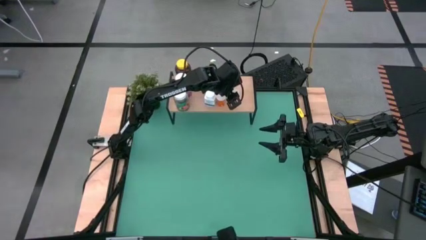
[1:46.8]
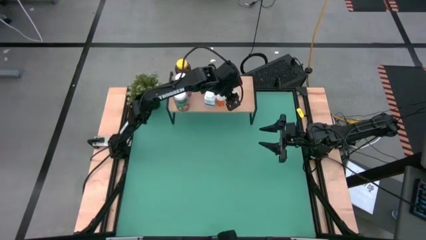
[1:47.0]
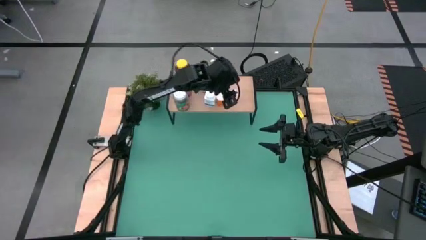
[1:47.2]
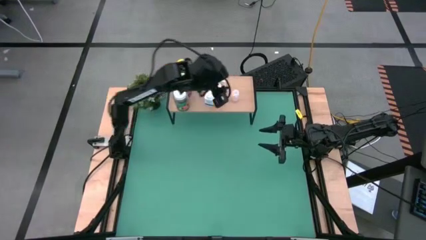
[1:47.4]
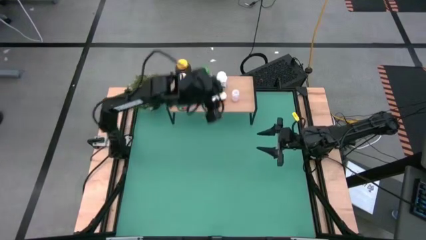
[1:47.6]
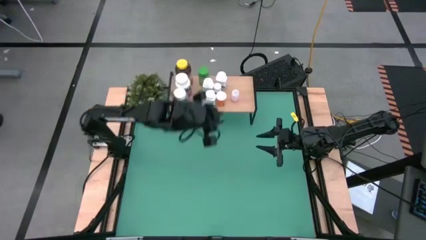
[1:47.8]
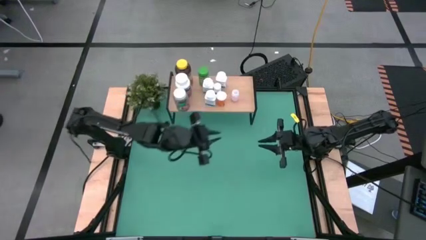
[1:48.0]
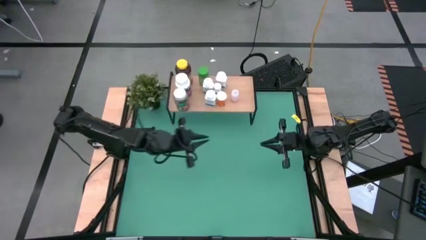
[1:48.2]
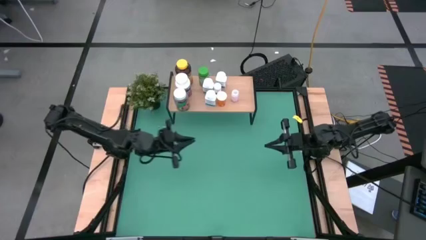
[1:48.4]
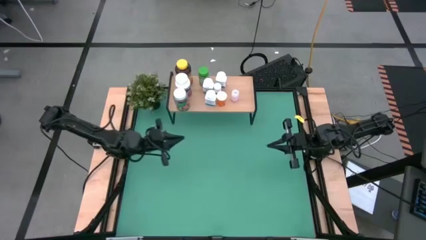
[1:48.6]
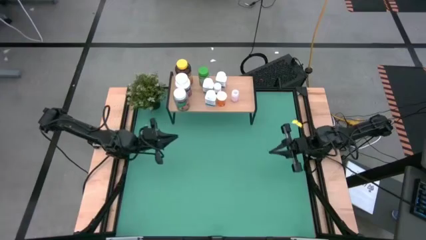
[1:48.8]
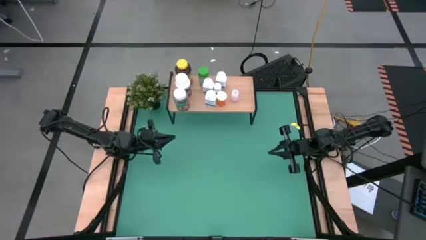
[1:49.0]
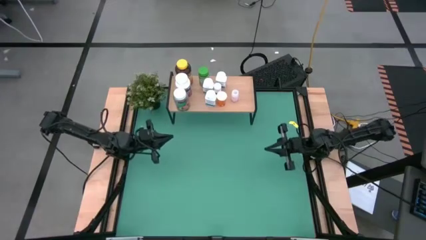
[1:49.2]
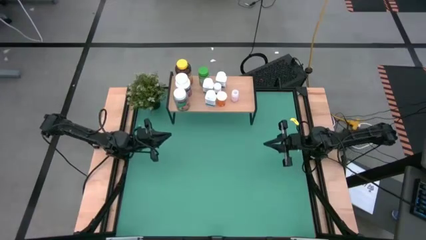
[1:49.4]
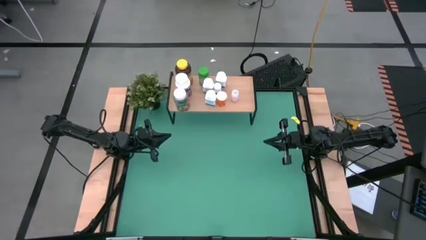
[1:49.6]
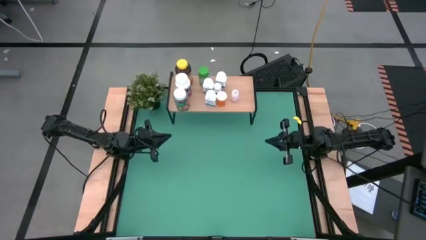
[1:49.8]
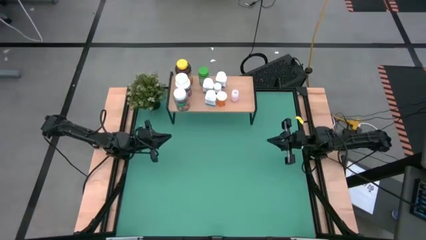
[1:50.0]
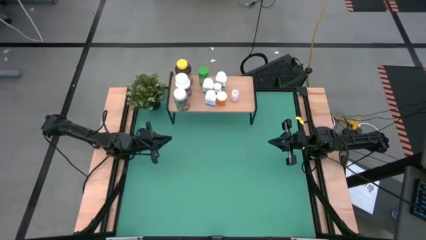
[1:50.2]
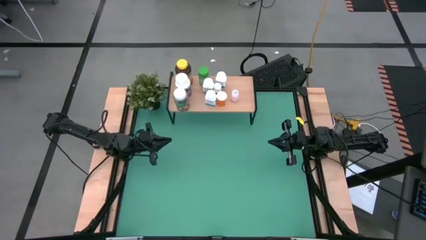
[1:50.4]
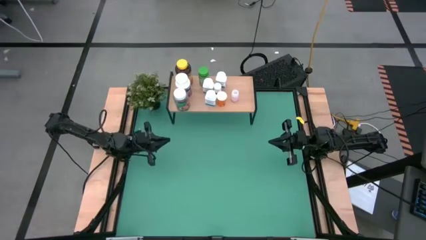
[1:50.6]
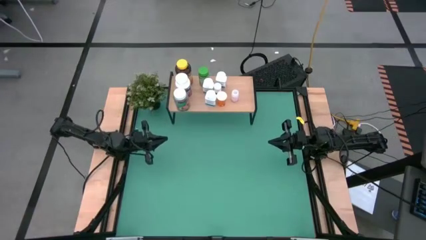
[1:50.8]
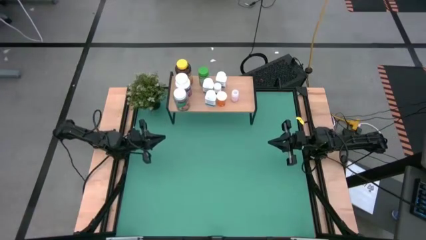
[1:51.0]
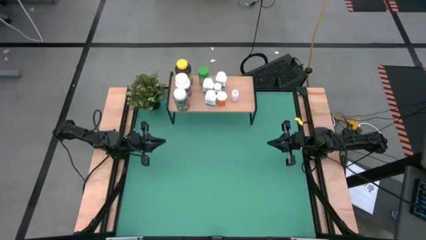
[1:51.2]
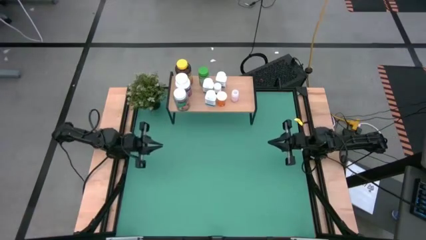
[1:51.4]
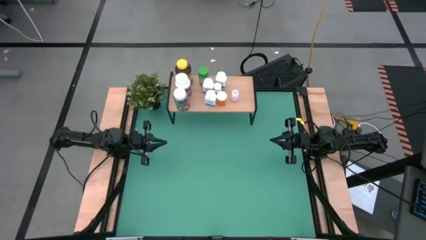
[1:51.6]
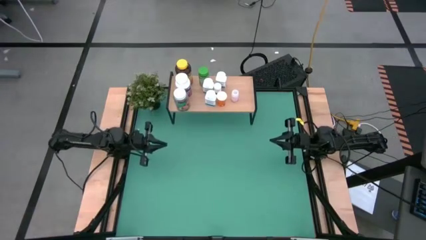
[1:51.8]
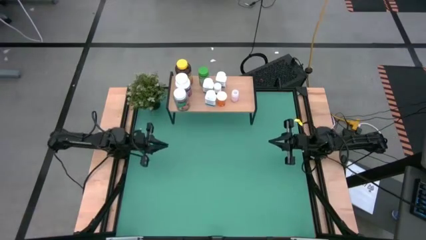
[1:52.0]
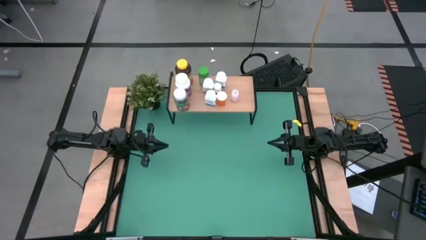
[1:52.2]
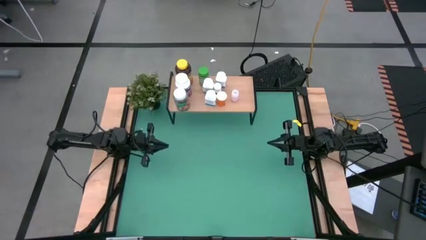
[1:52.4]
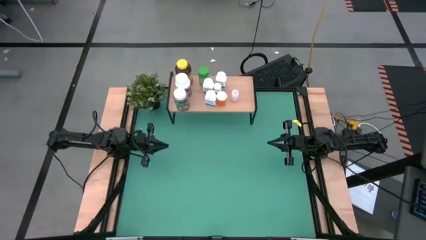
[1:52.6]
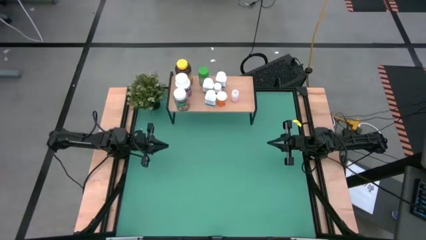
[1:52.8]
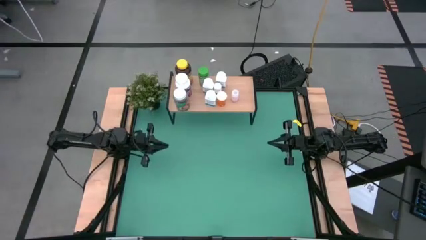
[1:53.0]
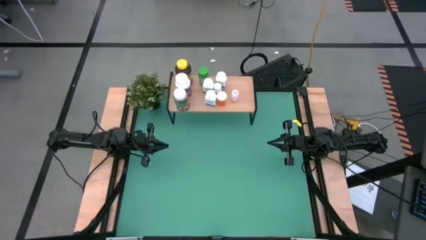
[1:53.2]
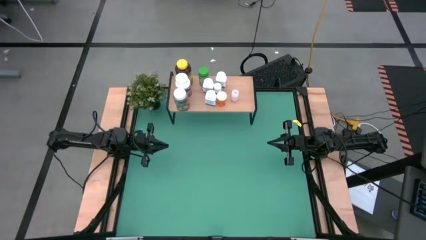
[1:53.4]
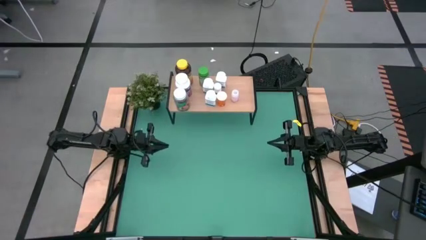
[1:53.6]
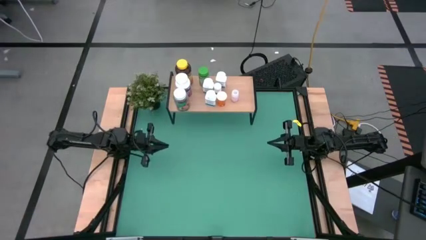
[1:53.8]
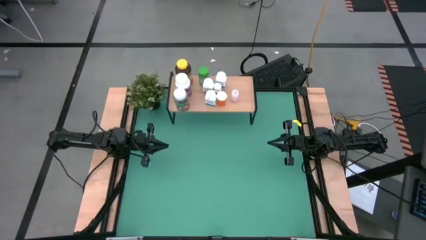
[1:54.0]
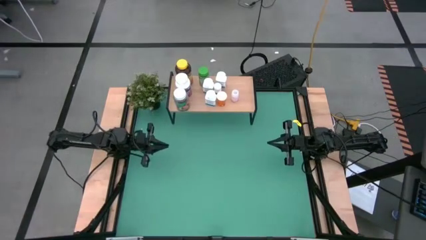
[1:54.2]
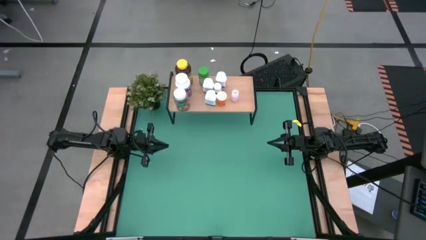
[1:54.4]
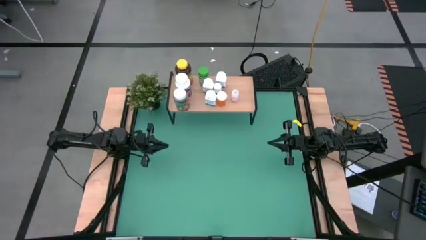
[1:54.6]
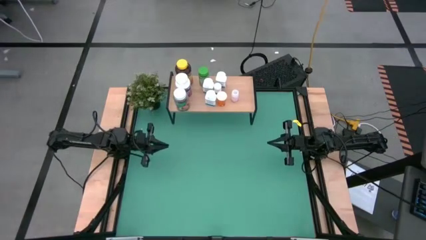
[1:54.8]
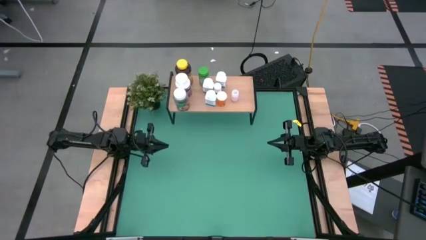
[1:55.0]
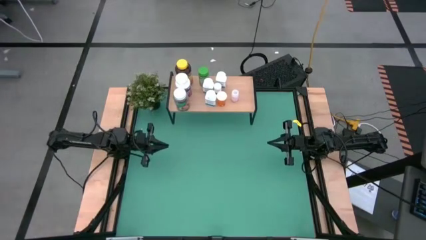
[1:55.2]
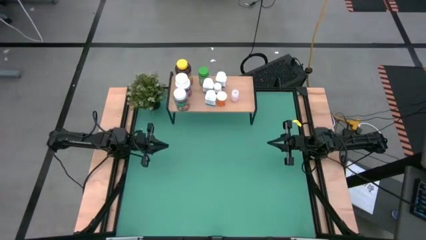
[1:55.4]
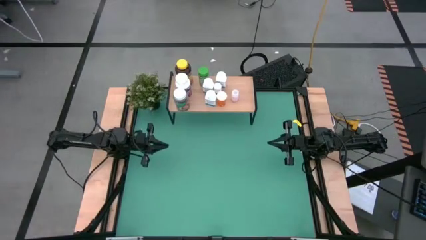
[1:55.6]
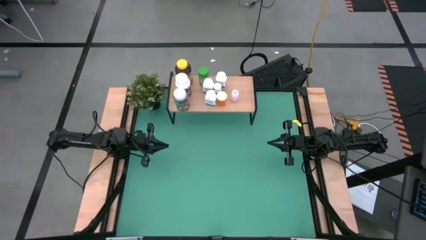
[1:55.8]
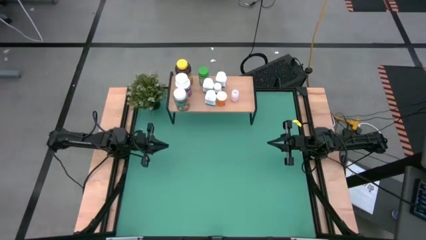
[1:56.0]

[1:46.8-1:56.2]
Task: Pick and place medicine bottles onto shelf by color
Return to Home Position

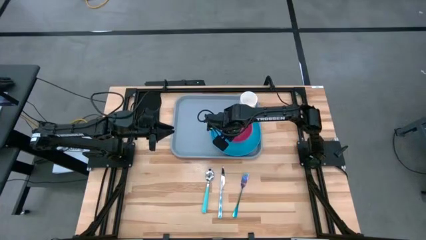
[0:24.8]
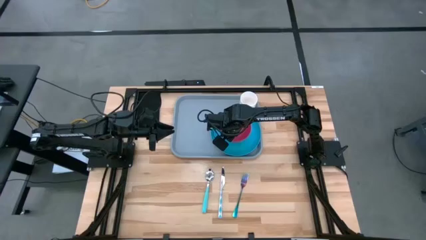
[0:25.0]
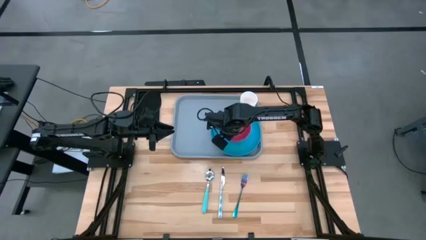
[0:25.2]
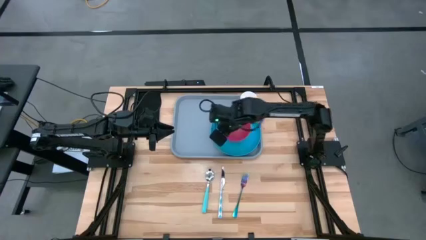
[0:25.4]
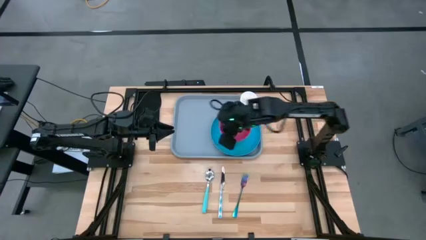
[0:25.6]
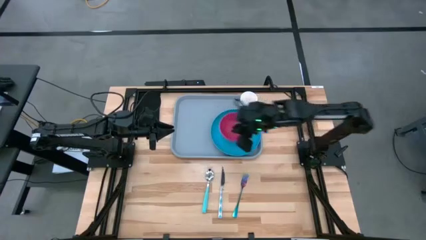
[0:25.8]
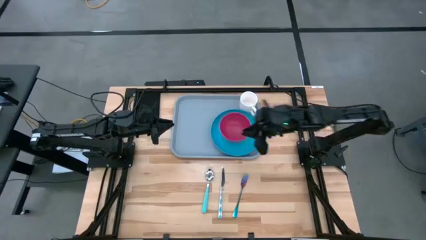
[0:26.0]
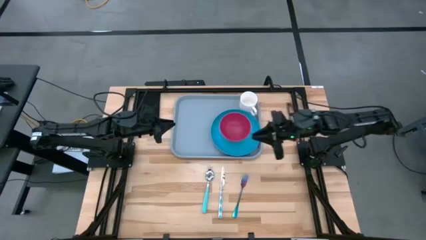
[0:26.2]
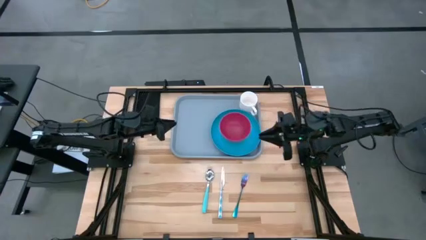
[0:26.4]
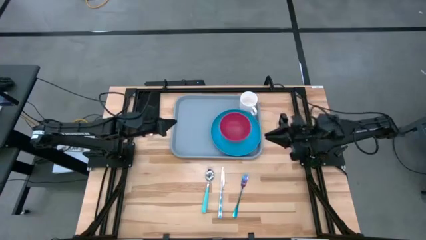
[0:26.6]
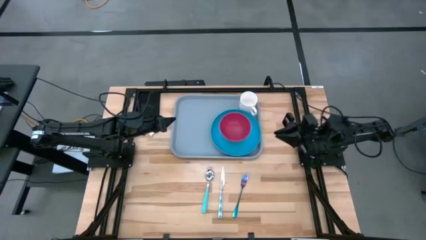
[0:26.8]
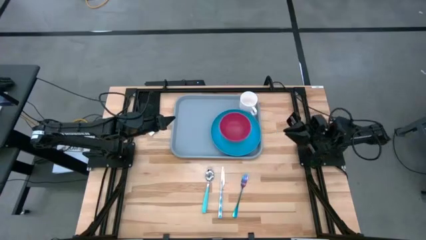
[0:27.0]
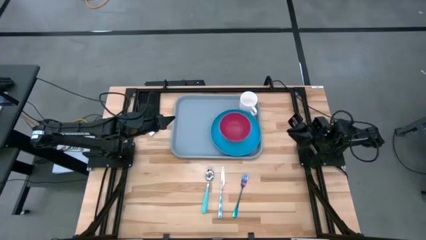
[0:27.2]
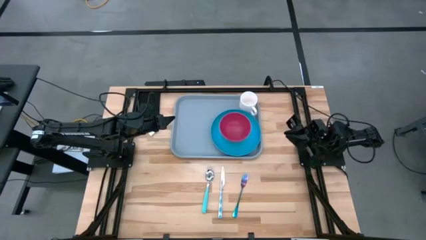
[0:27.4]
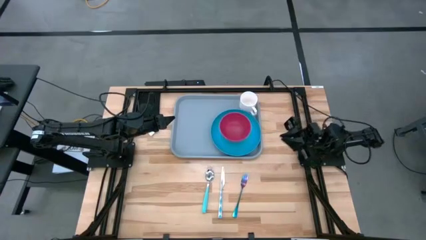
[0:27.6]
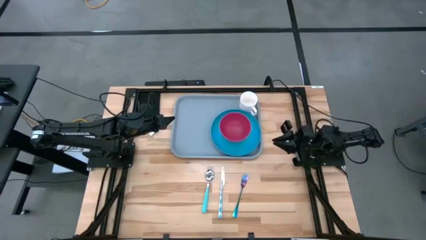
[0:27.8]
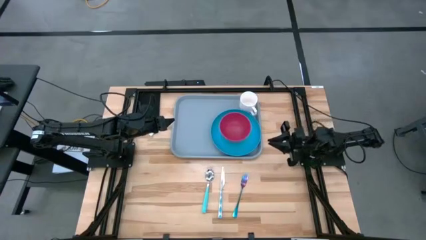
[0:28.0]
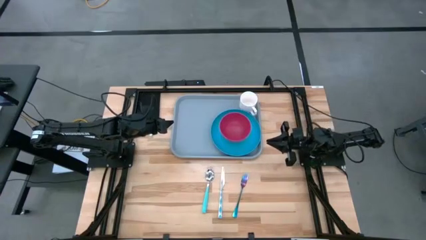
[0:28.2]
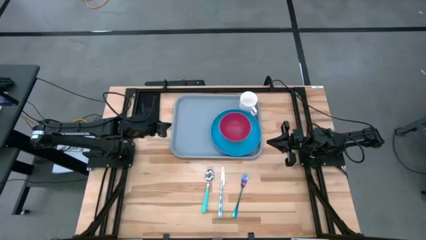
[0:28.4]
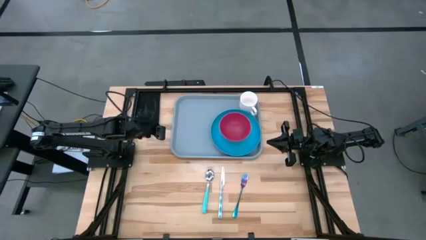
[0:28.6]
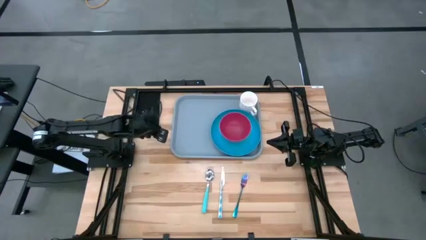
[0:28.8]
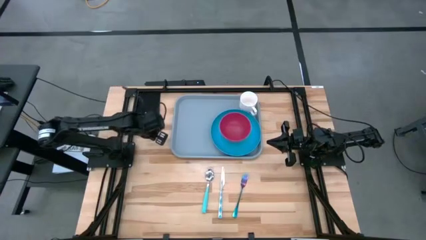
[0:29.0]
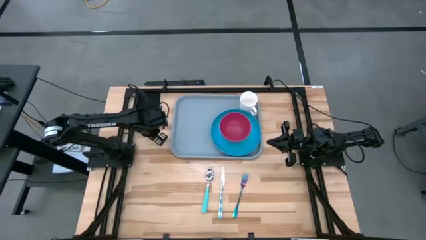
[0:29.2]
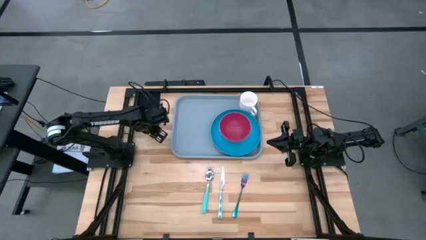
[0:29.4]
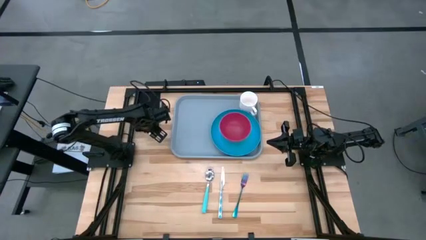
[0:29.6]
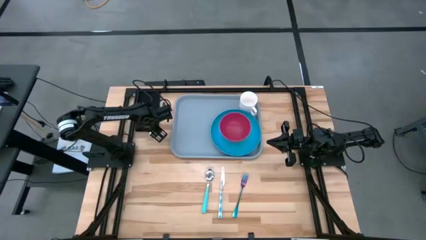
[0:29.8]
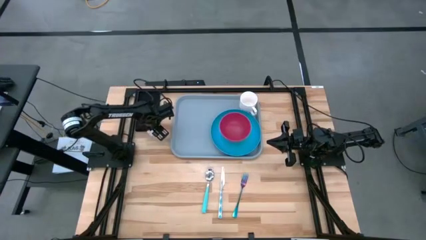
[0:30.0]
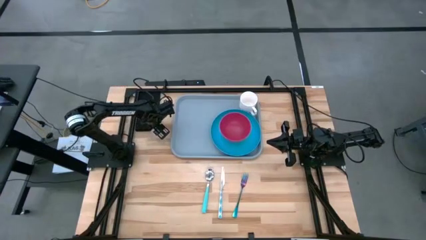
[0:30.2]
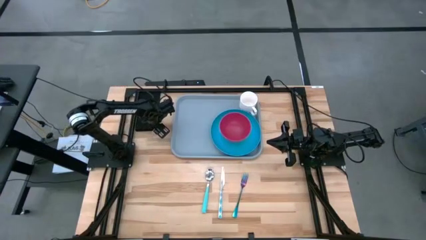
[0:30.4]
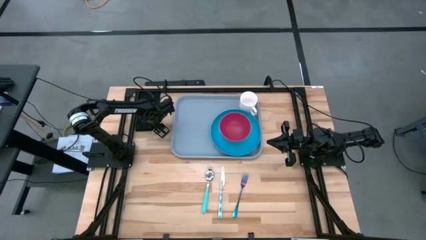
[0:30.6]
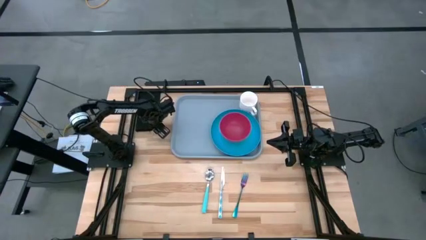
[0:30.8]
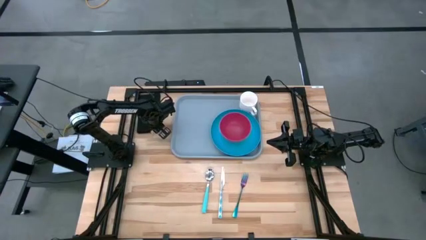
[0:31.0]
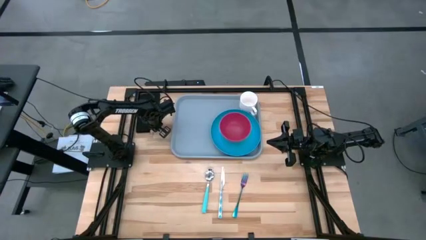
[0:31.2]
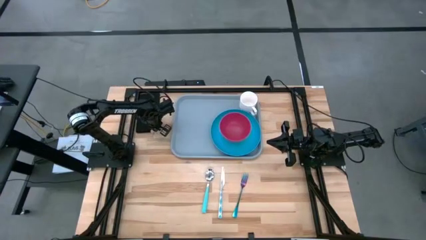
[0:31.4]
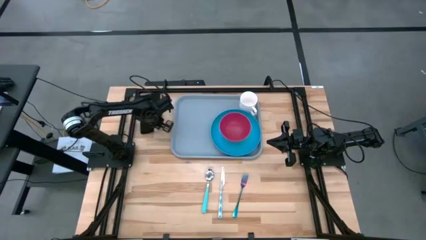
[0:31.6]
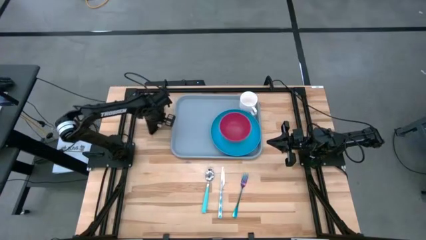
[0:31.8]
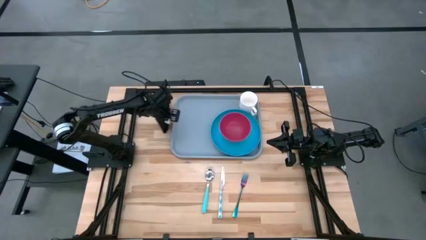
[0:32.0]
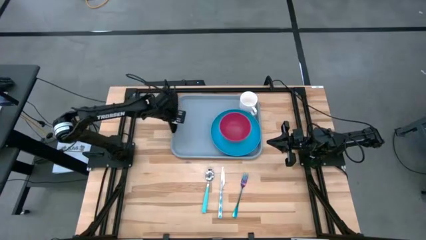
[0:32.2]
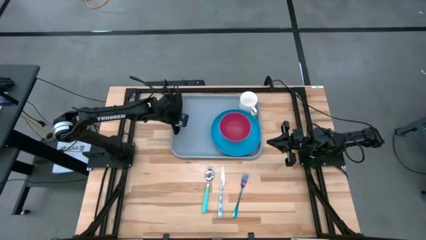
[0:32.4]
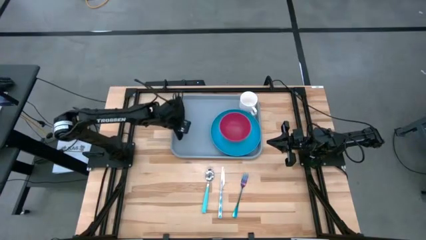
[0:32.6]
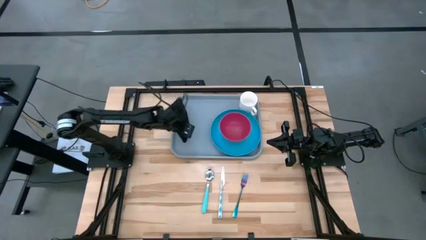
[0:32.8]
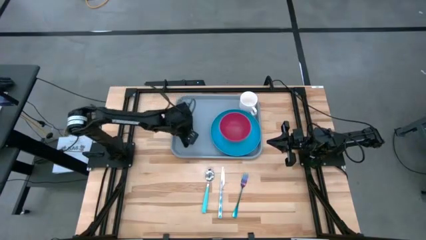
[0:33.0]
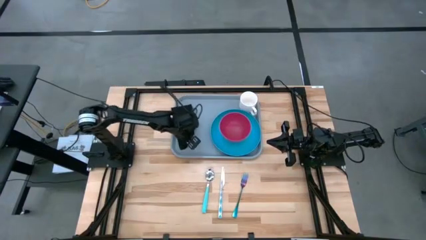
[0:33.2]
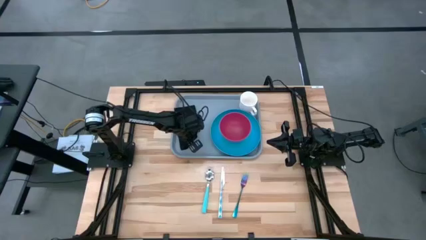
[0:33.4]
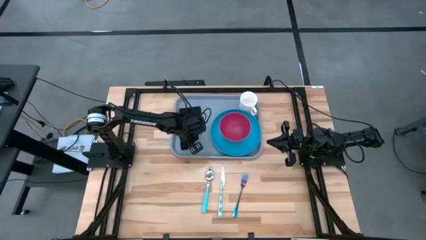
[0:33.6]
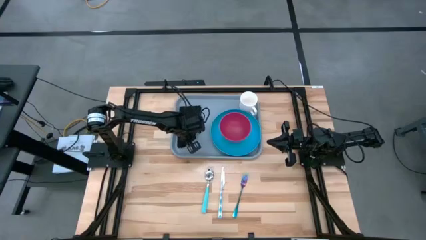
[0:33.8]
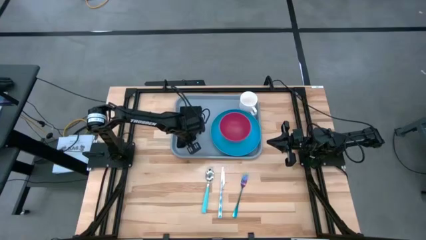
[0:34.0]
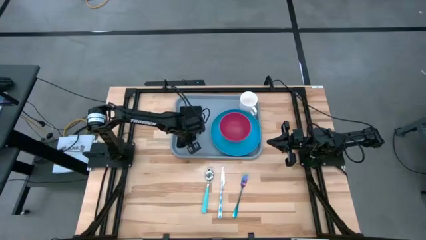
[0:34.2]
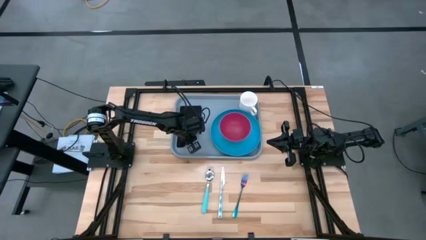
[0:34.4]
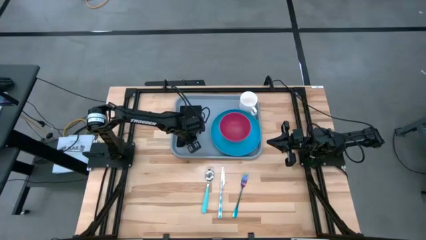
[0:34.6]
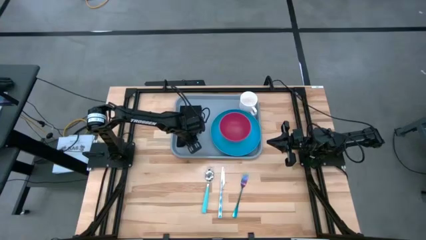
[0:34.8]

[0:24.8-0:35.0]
Task: Set up tray
Put the black napkin on the gray serving tray to the left of the blue plate
